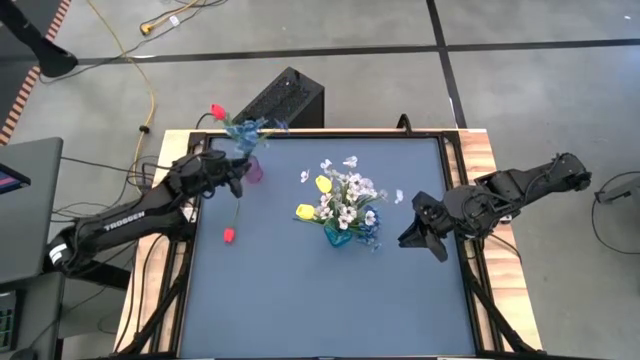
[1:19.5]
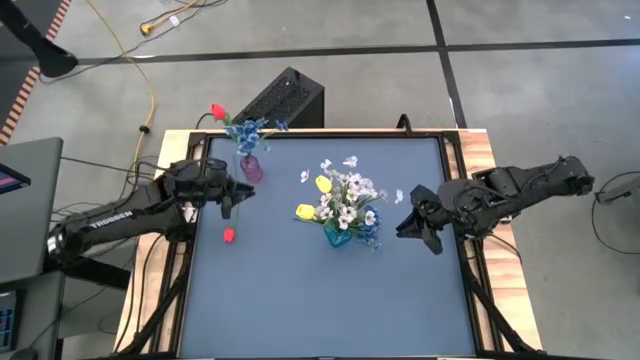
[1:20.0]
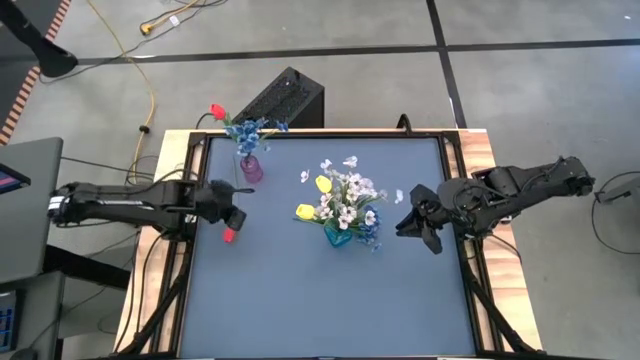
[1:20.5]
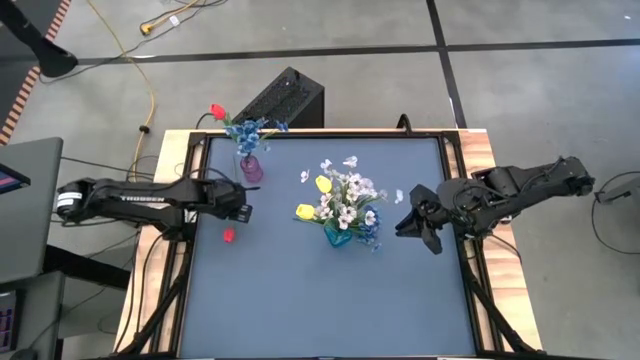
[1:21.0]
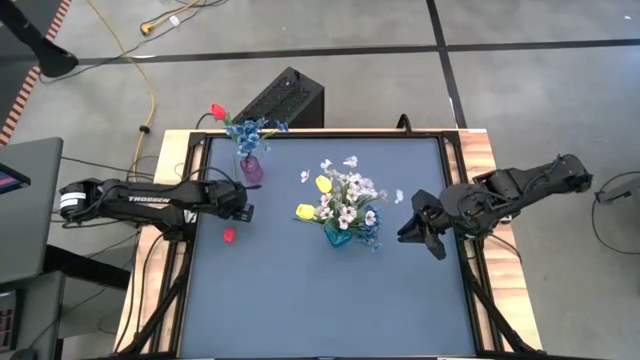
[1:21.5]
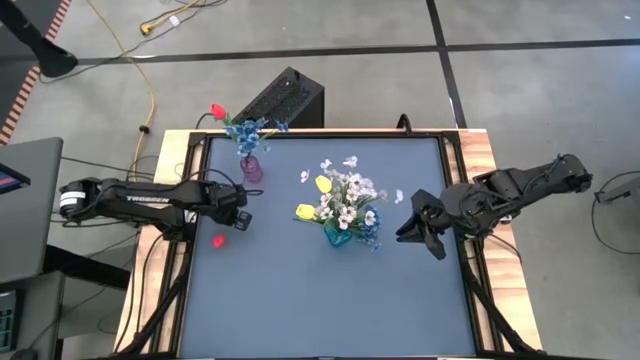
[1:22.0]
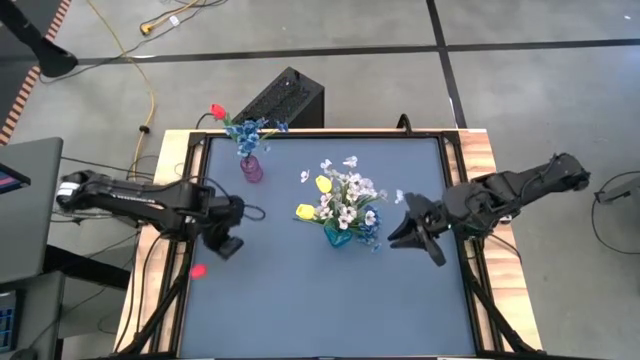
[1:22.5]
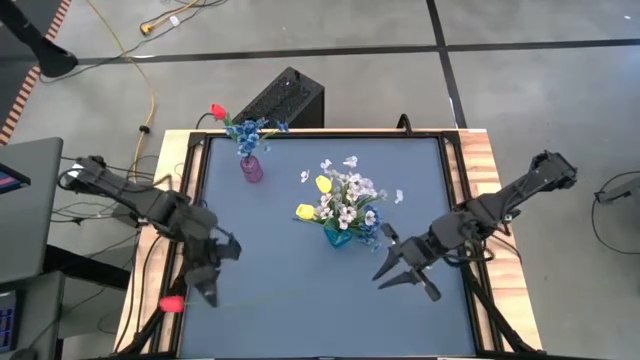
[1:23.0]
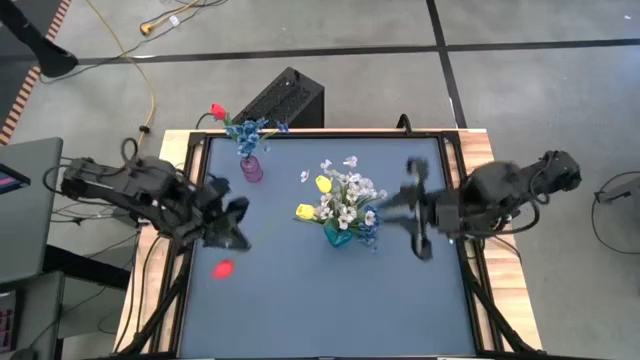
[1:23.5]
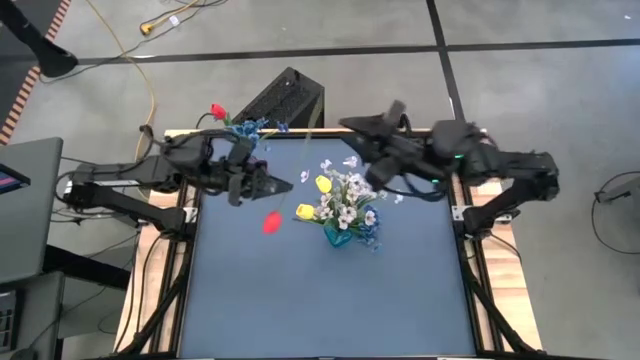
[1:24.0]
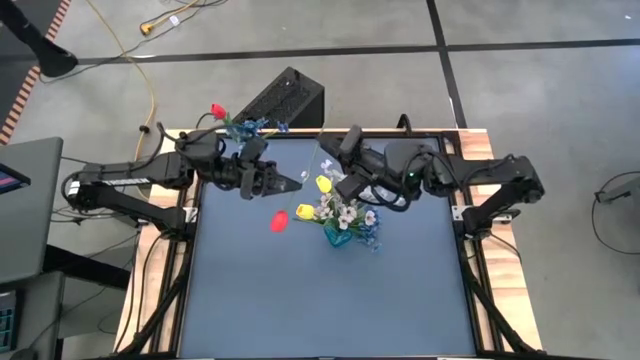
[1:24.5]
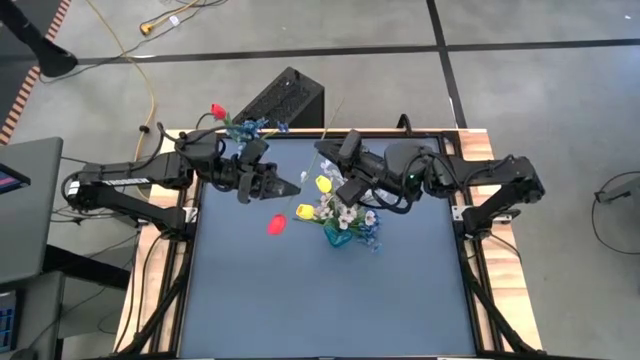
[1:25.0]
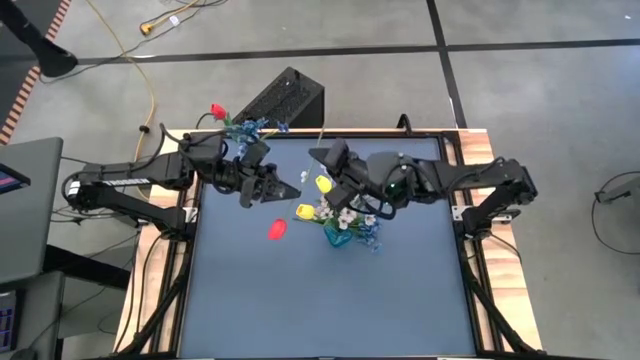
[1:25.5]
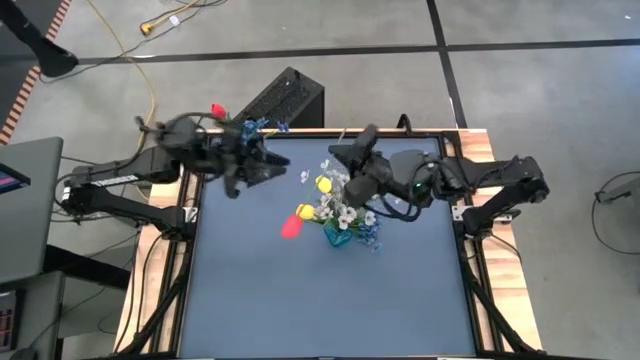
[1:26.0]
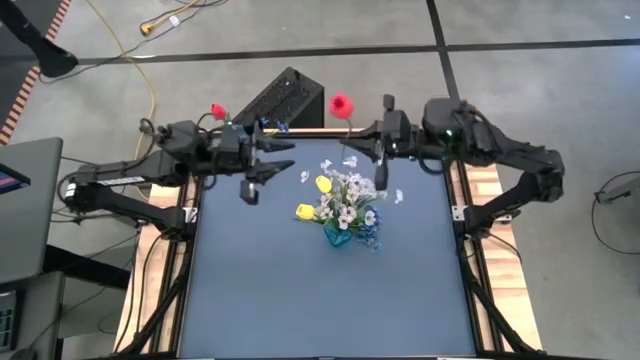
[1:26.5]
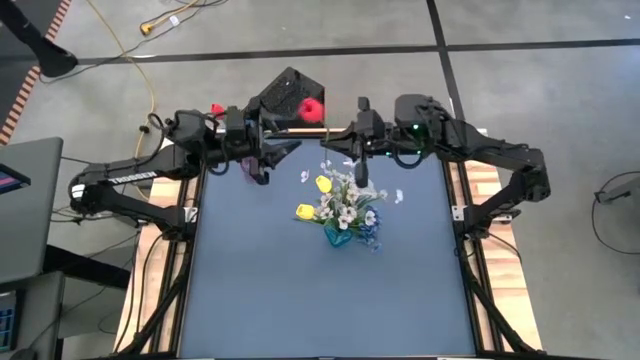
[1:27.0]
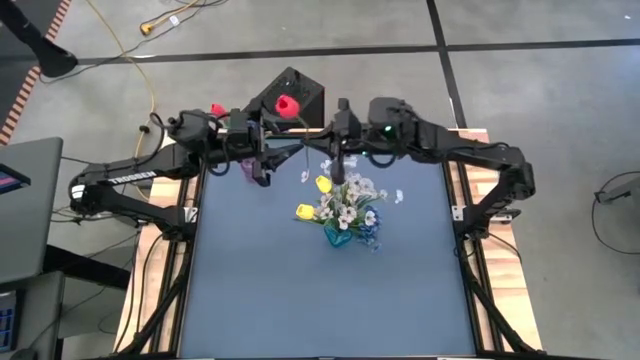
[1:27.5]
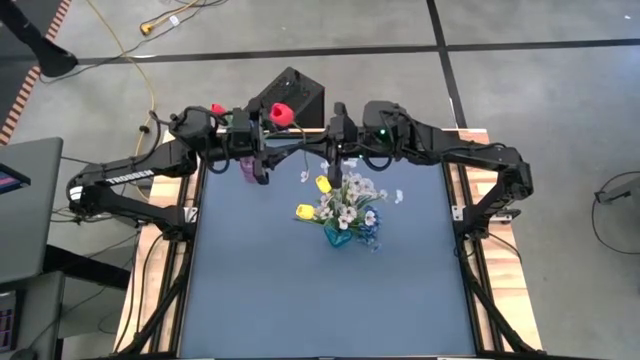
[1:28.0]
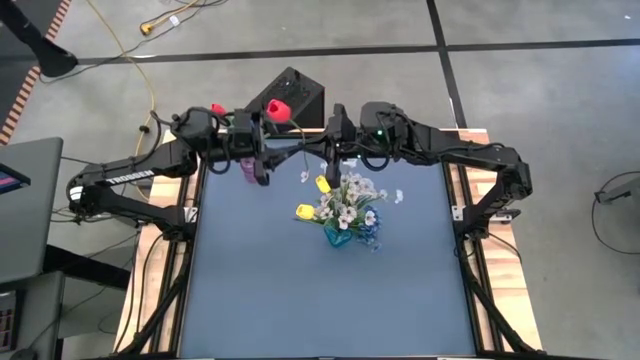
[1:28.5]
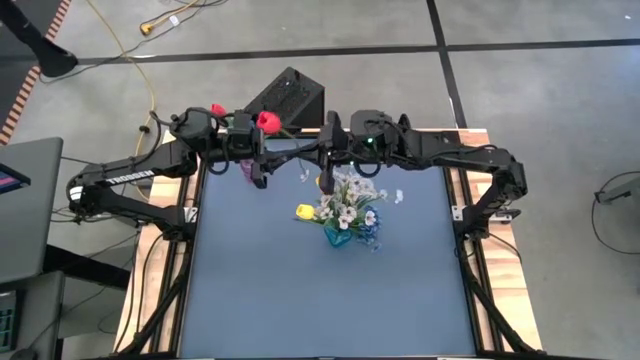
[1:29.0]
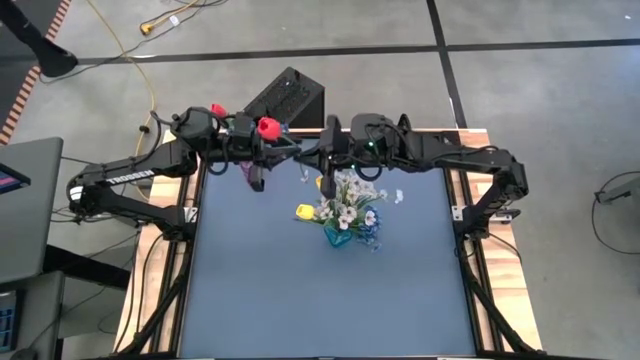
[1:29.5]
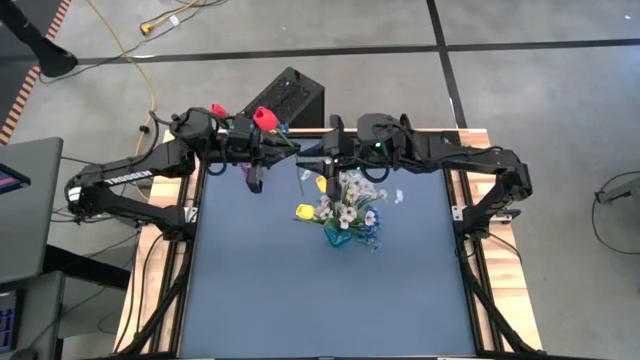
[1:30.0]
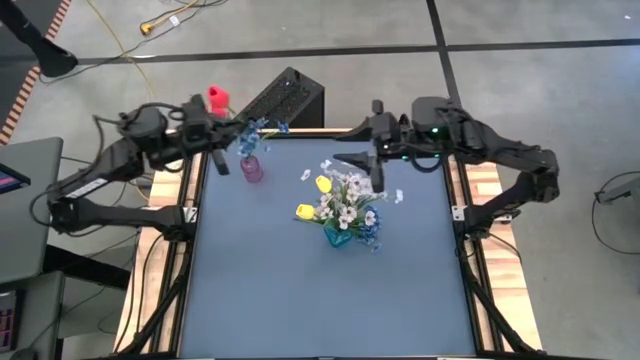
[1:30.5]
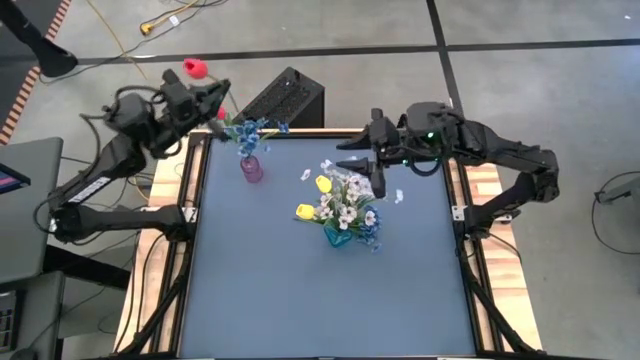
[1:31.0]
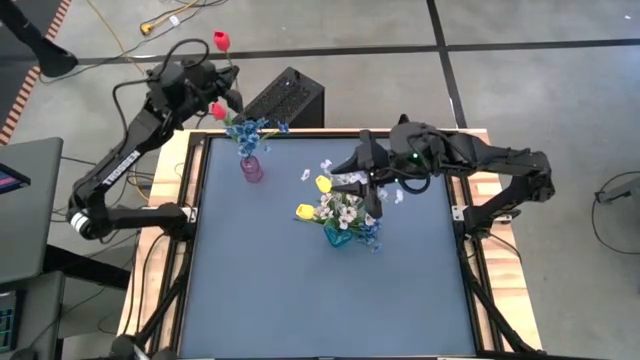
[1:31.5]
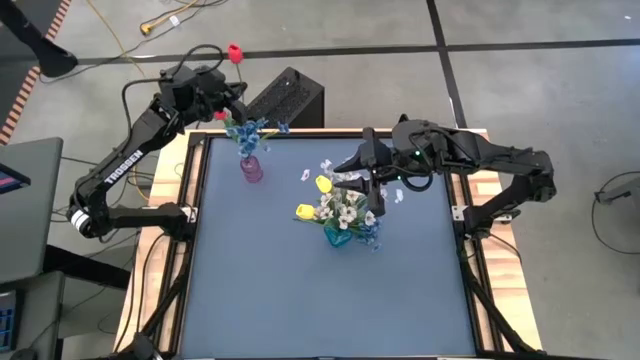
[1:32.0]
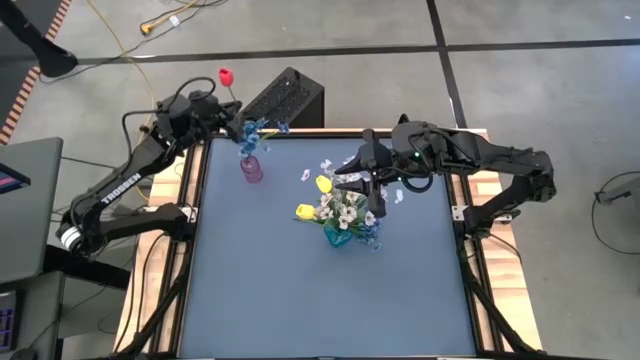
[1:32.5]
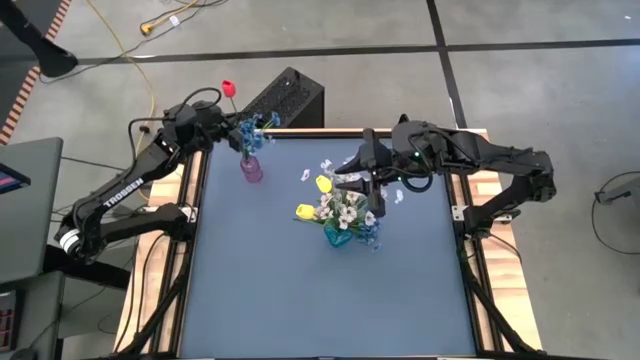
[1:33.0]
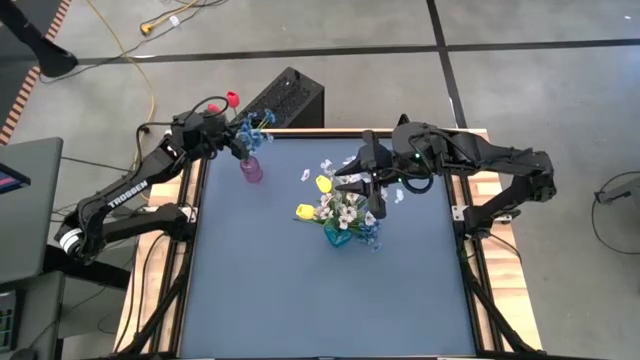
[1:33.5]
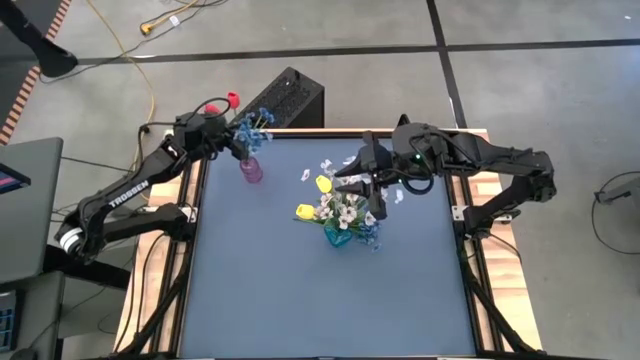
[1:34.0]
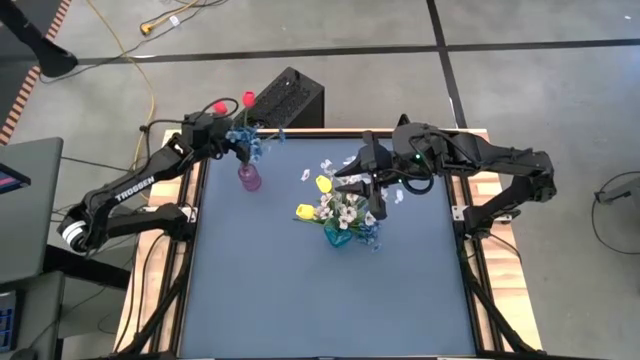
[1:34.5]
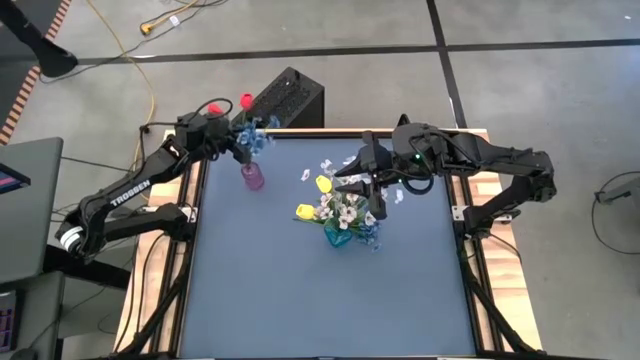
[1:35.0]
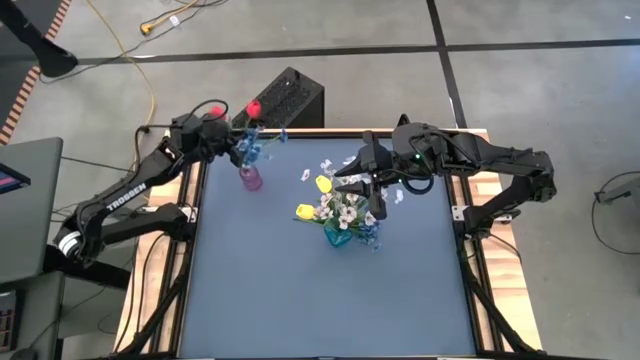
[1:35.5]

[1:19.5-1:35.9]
Task: Sort flowers into vase by color
Put the left red flower into the violet vase

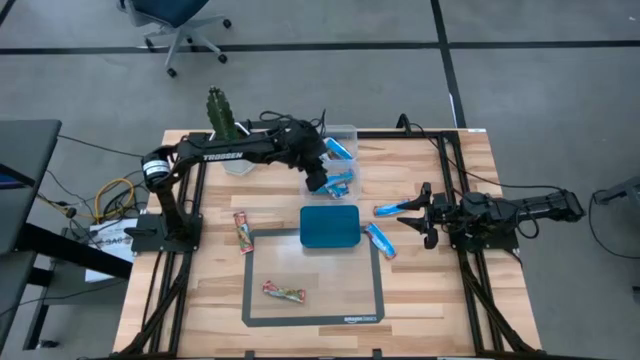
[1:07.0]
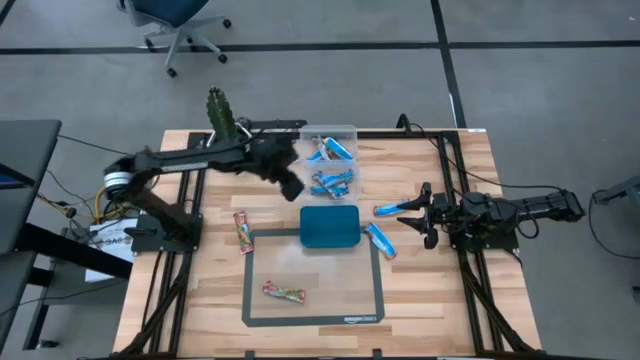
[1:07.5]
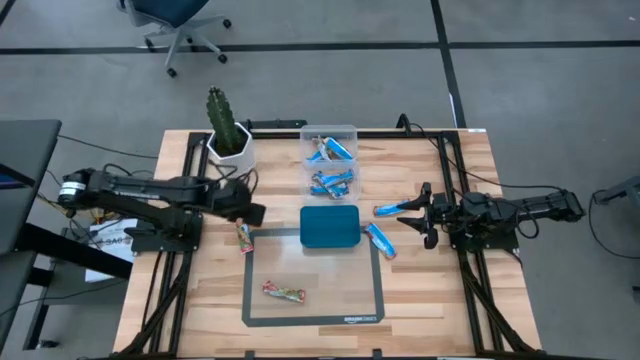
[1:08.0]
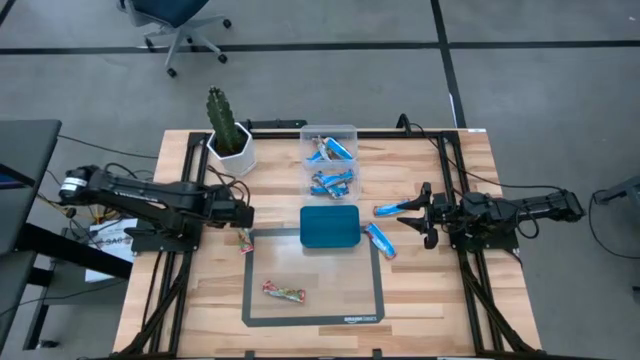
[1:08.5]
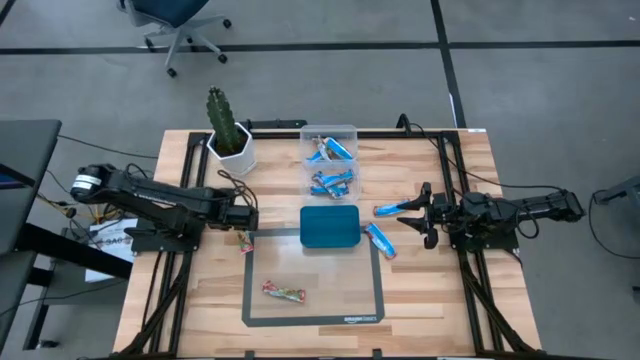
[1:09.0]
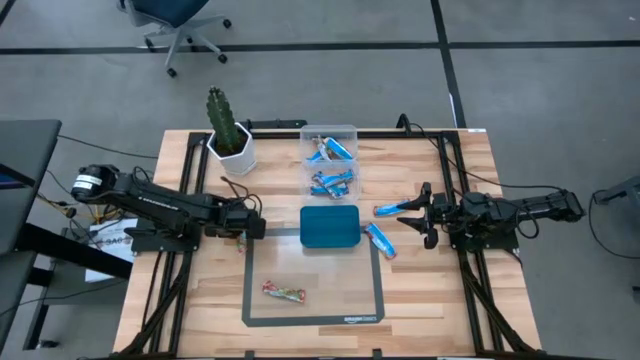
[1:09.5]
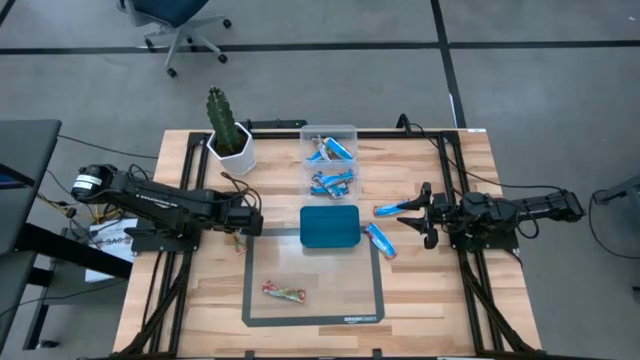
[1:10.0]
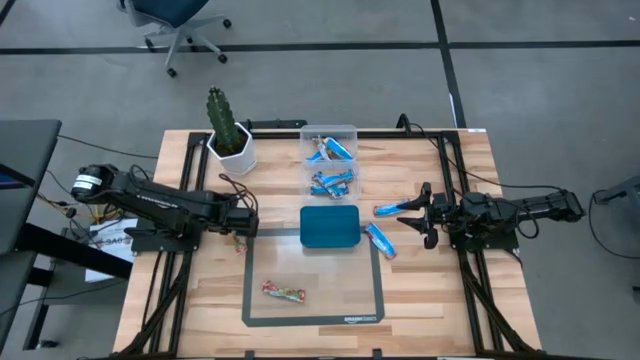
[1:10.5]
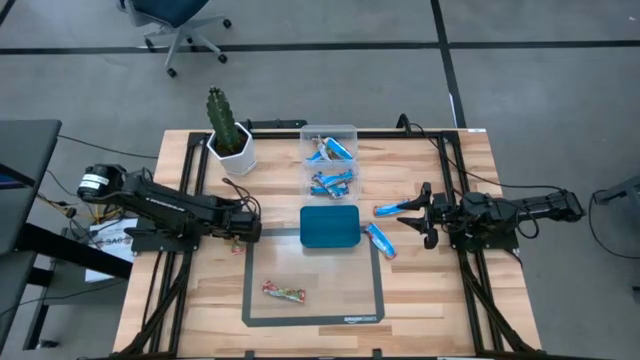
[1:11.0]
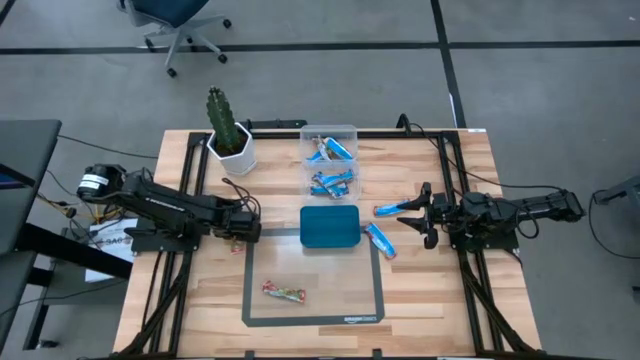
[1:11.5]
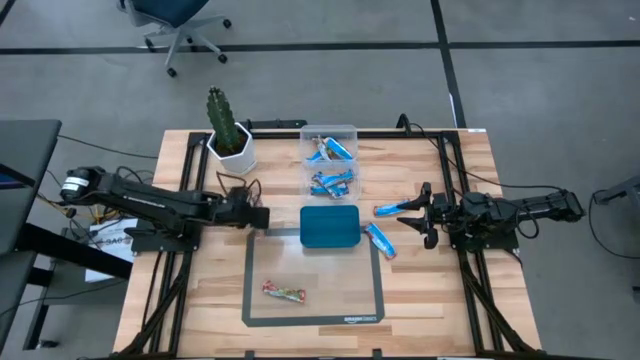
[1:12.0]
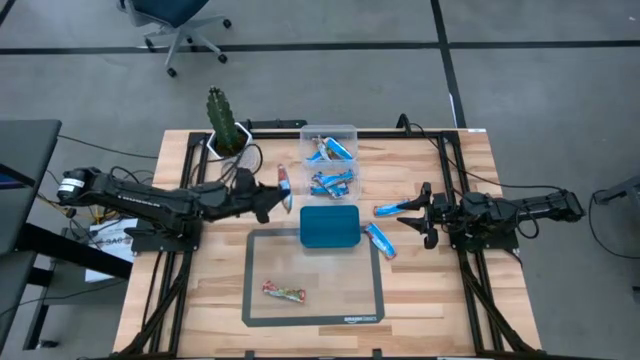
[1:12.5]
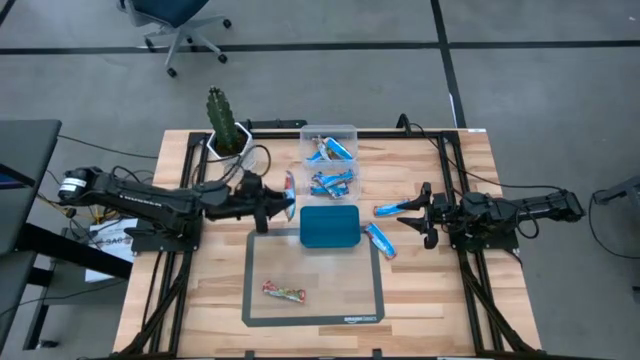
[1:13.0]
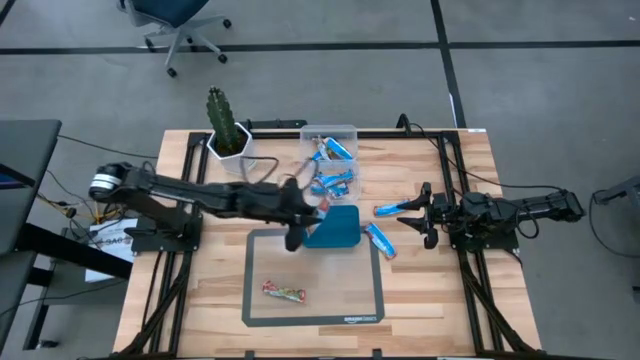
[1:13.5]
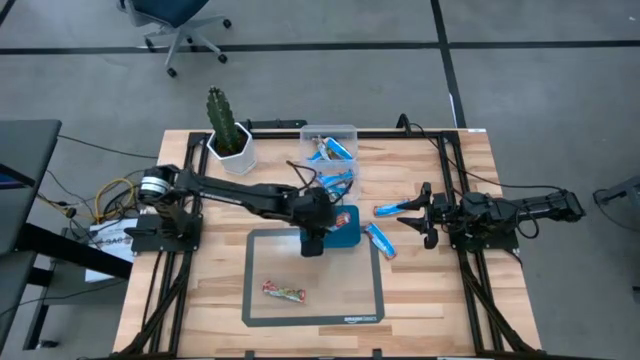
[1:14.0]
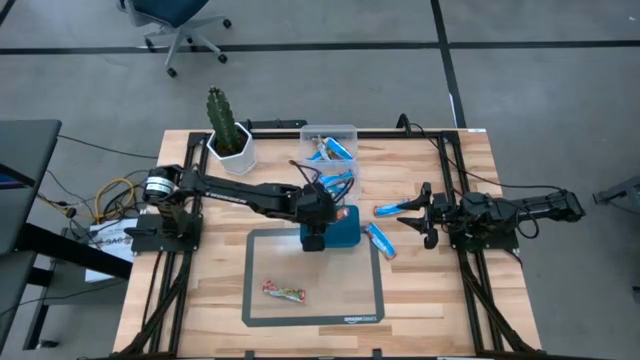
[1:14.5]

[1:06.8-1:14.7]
Task: Pick and place Granola Bars by type
Put the red granola bar into the blue bin
